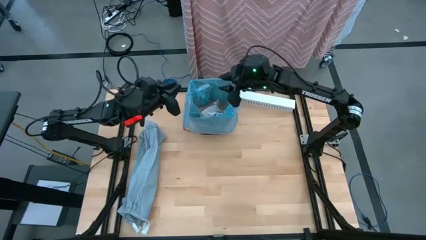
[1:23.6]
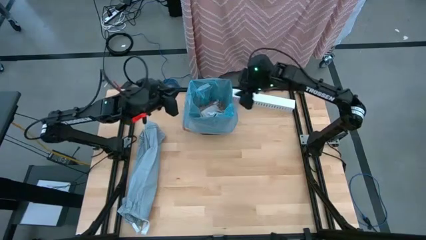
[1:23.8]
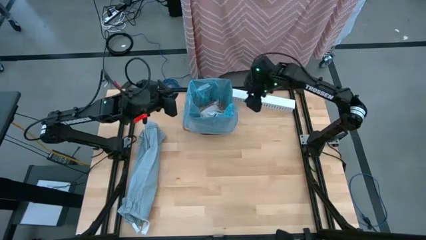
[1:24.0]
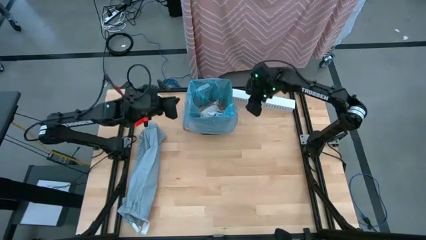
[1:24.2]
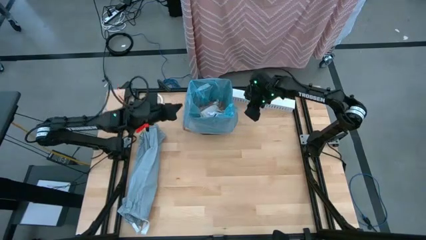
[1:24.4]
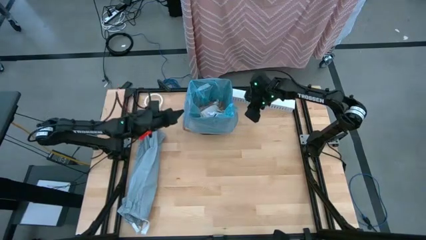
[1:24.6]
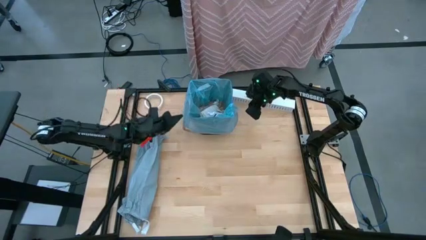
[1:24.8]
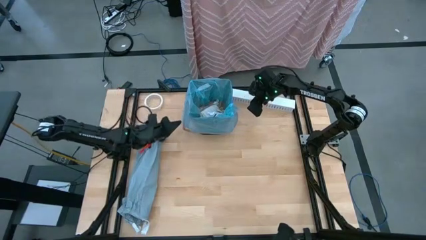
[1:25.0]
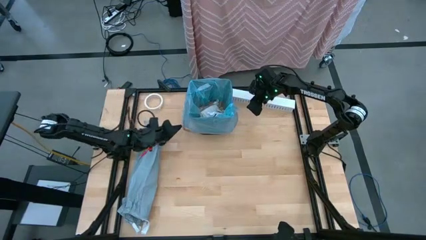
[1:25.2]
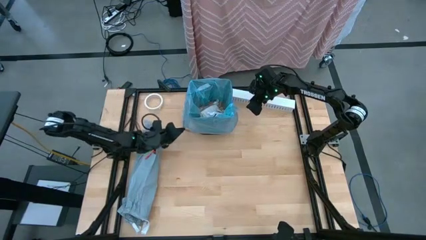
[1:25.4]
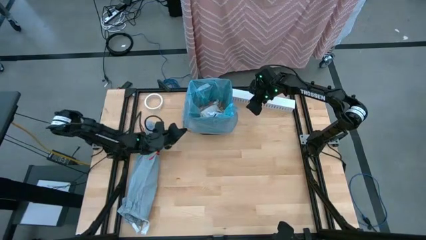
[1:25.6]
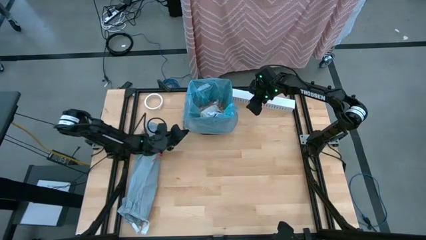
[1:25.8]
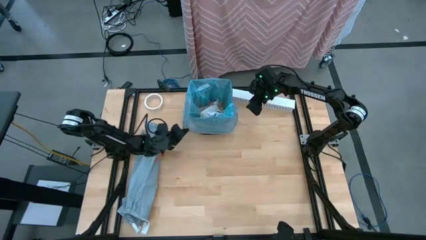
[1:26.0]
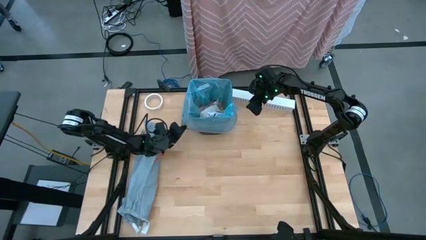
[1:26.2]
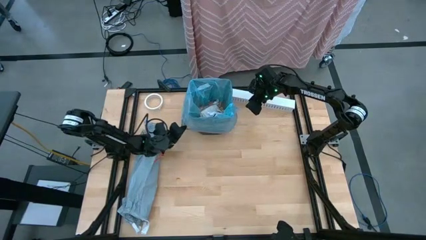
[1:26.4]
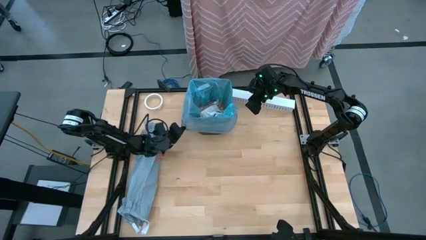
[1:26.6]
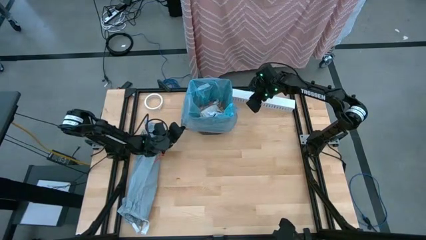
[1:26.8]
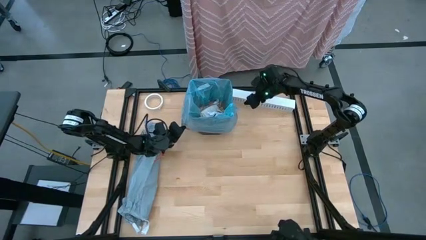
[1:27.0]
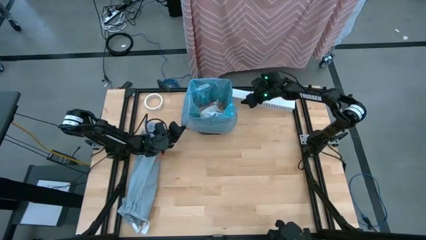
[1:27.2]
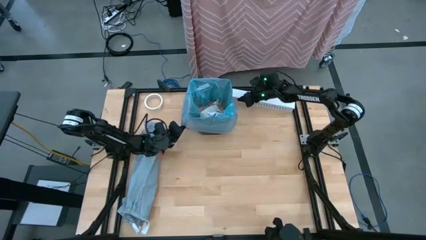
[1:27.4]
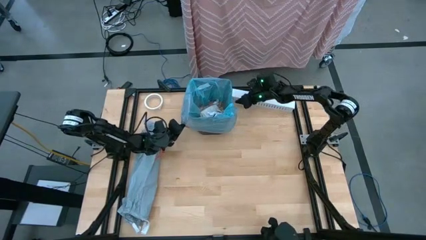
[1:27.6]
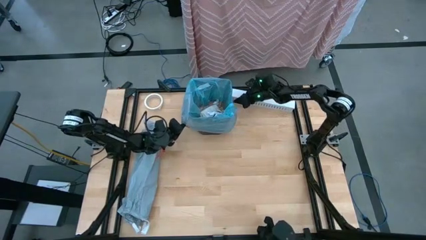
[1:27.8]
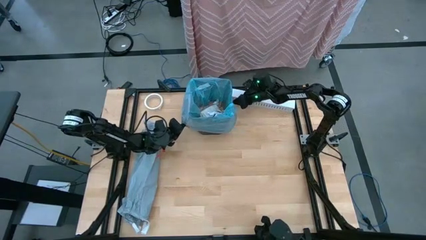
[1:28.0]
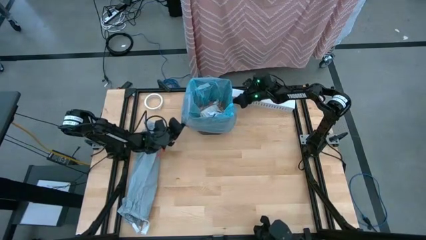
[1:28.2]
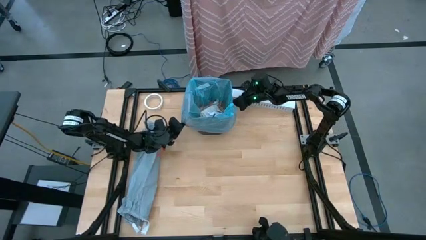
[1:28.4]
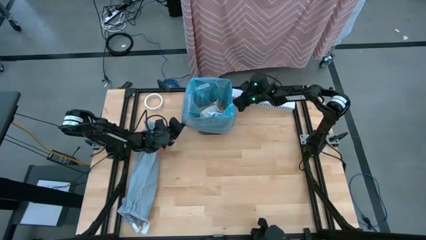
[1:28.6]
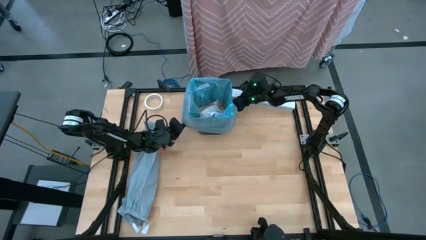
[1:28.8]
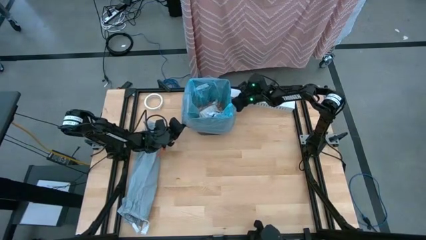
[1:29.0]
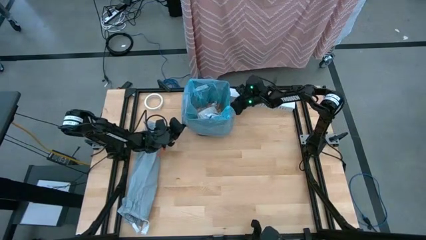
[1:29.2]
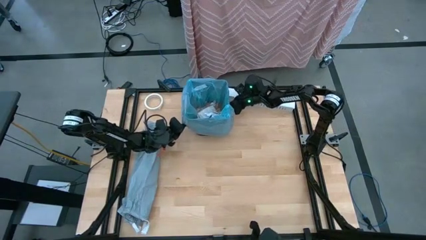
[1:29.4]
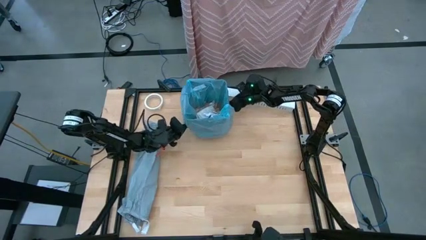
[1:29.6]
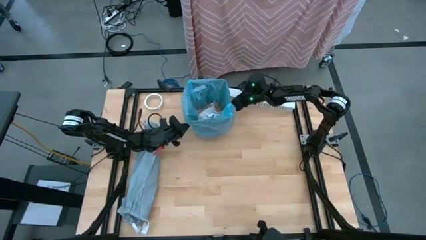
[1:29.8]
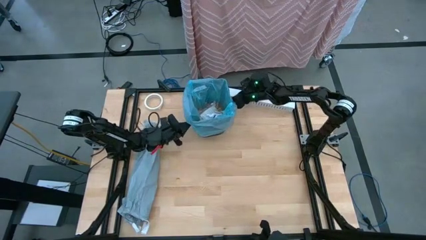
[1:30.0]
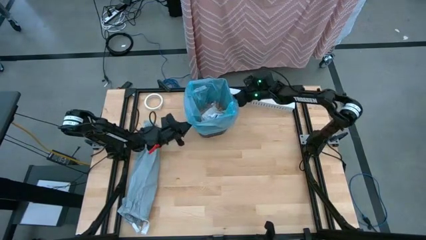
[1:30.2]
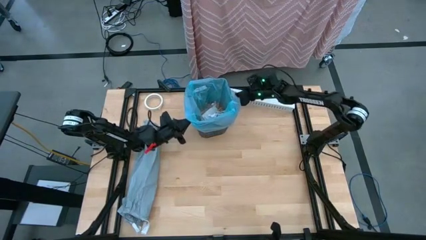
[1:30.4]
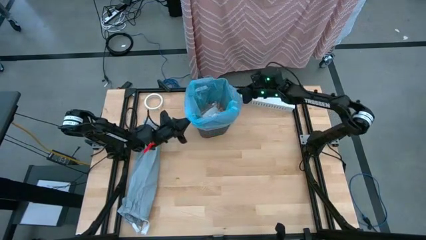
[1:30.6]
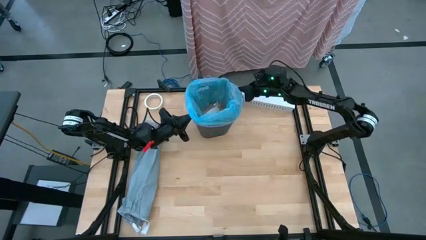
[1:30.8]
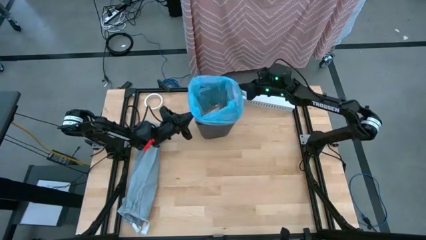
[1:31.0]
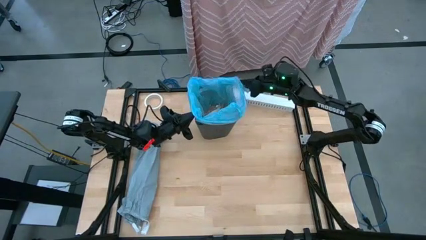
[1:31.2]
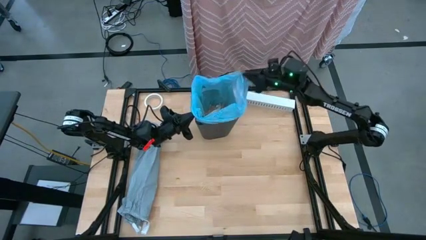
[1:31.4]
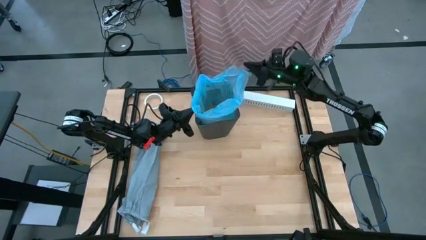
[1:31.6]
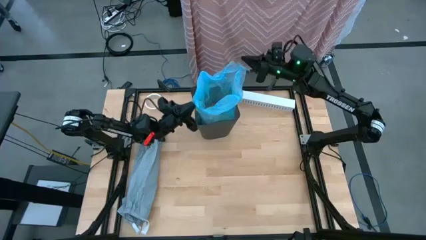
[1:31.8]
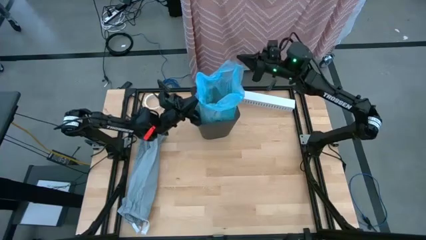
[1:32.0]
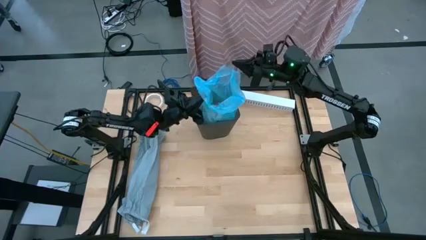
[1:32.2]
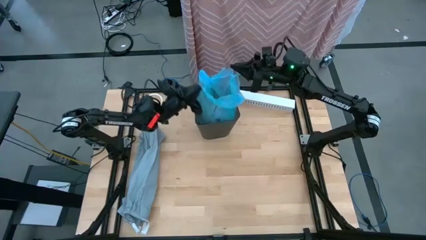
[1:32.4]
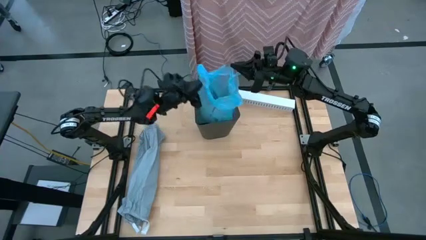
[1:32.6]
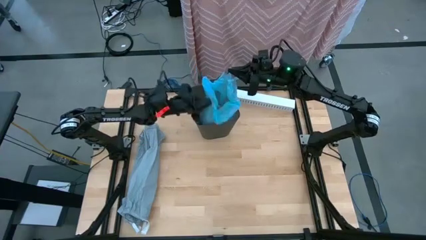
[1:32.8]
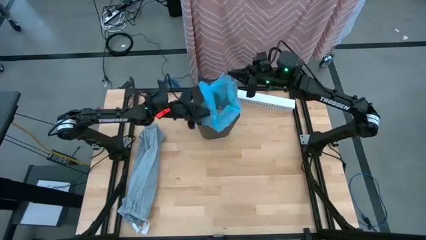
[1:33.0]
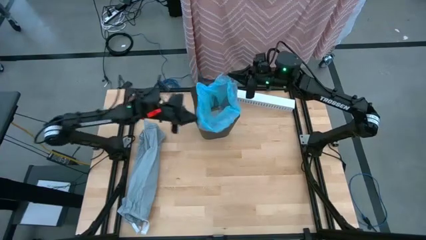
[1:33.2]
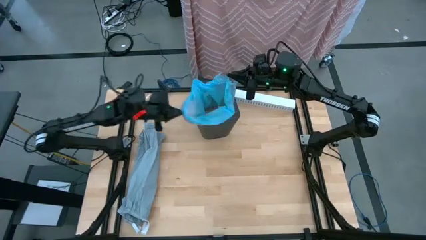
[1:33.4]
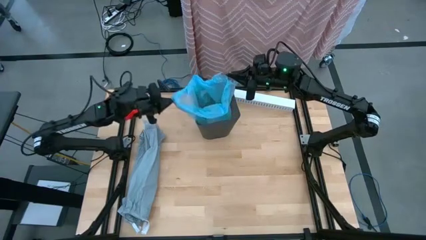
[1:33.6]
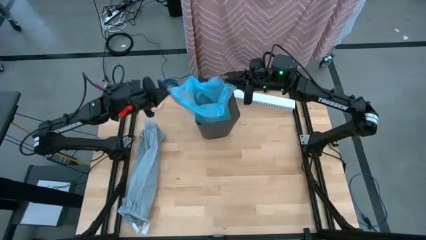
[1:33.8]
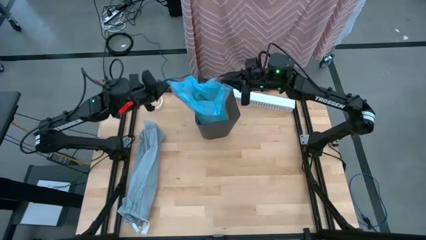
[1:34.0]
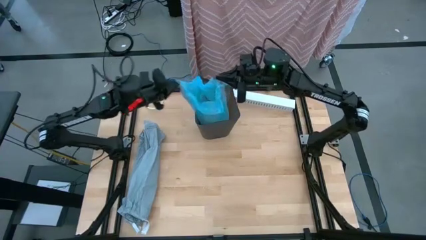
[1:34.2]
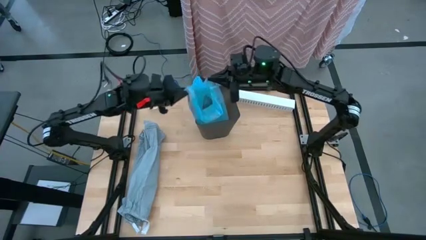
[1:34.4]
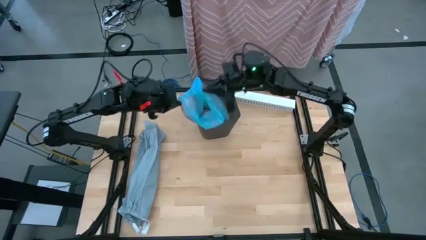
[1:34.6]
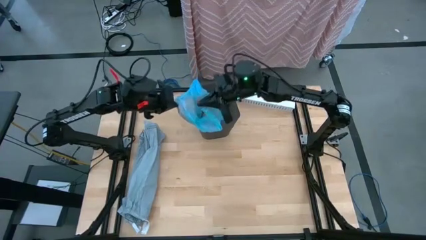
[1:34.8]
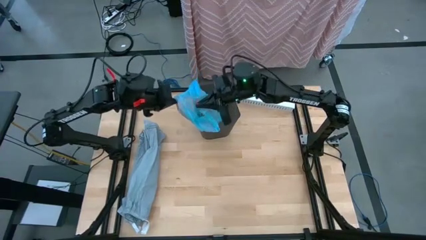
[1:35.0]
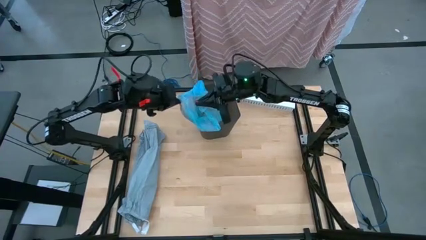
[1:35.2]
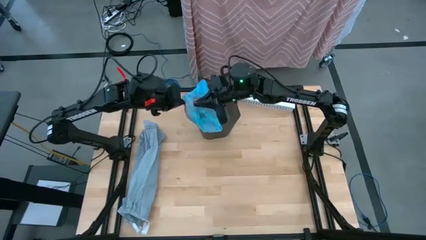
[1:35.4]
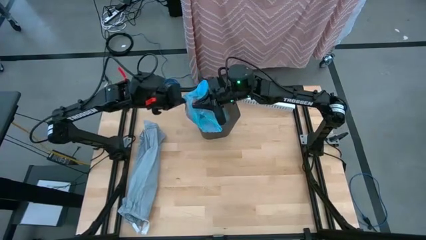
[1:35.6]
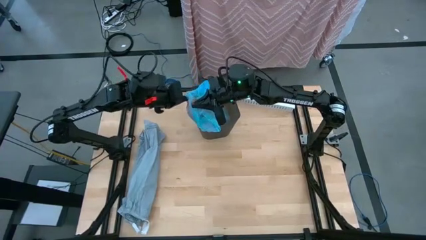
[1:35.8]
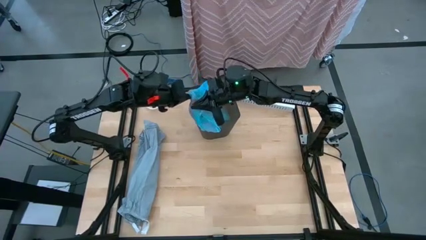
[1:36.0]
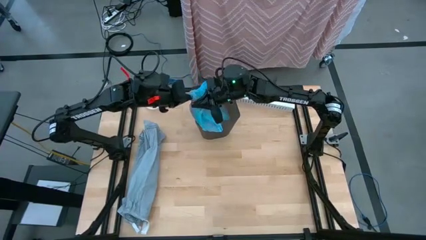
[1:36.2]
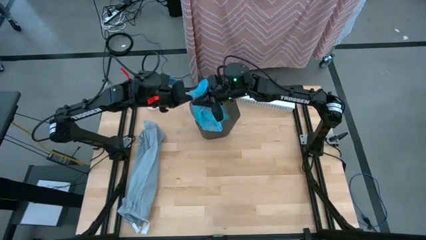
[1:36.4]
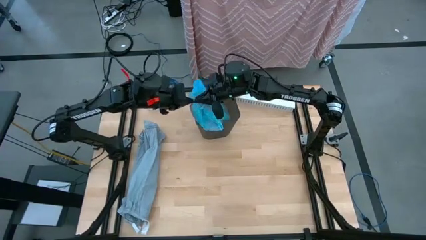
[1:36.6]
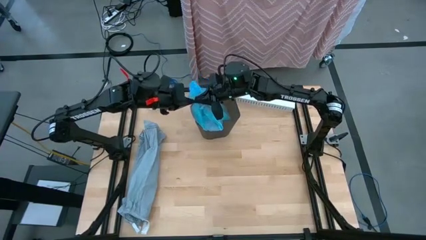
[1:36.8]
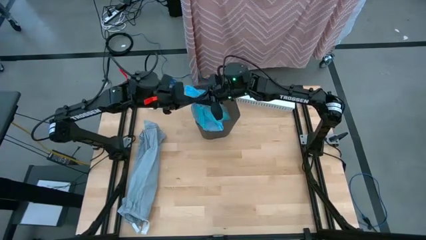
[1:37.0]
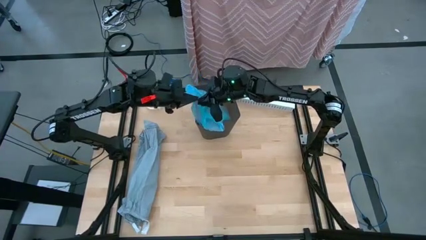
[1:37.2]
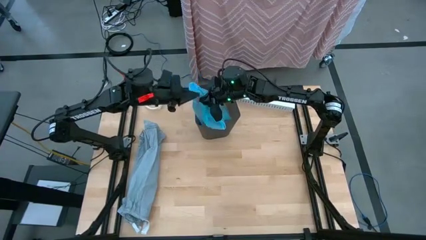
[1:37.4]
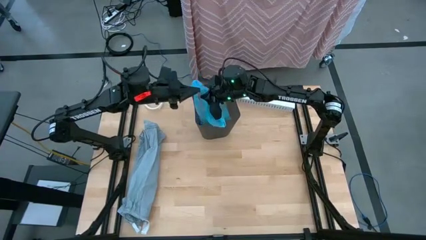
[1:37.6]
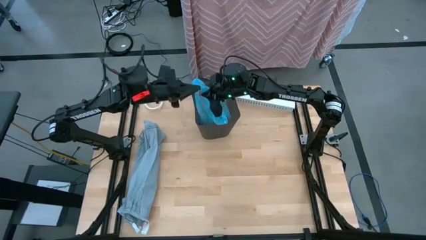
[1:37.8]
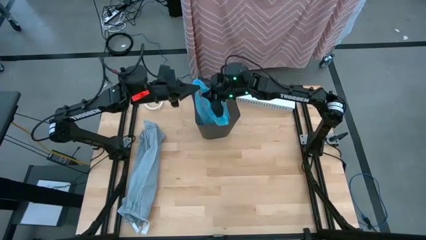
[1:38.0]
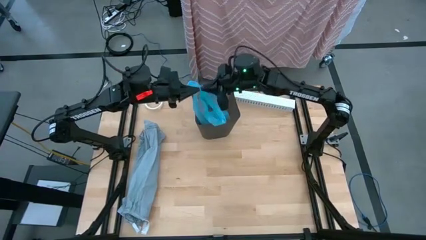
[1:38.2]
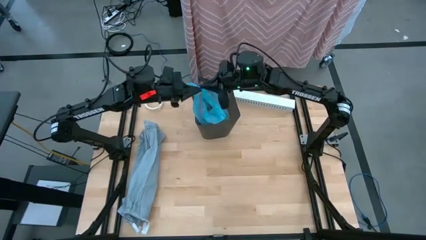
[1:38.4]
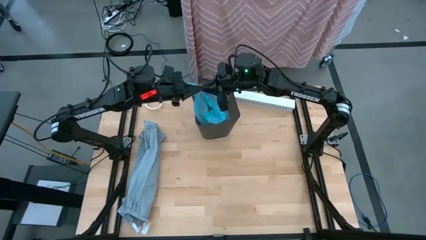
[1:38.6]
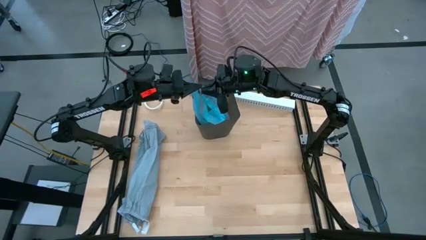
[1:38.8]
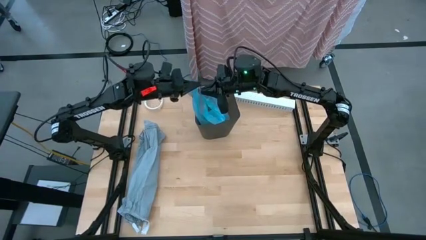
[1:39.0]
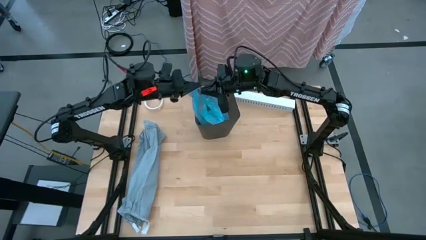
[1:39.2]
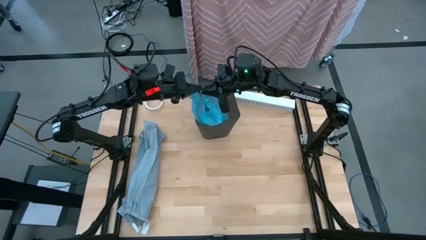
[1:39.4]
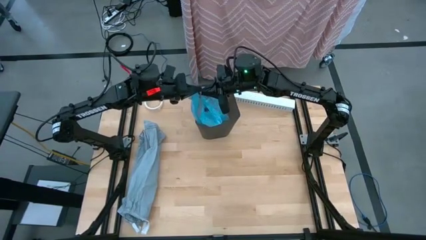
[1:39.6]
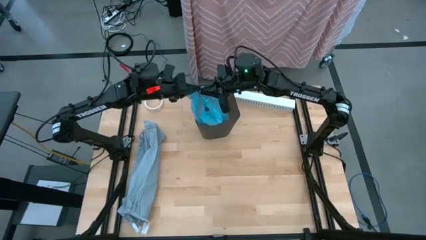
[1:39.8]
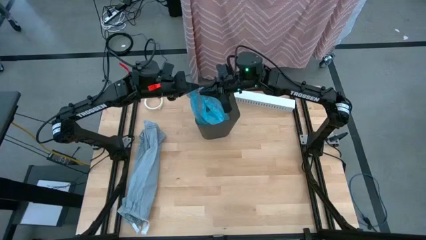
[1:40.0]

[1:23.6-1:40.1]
Task: place trash/remove bag and relplace
Remove the blue trash bag from the trash bin
